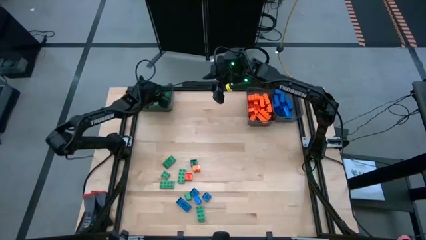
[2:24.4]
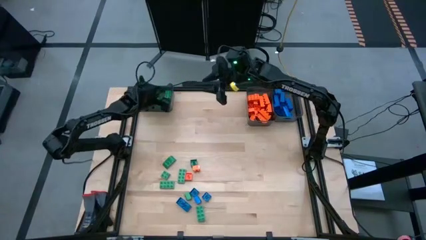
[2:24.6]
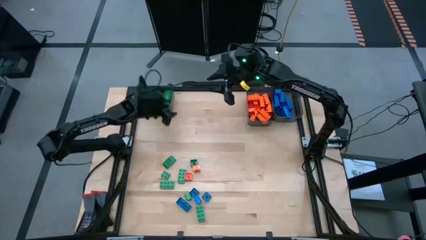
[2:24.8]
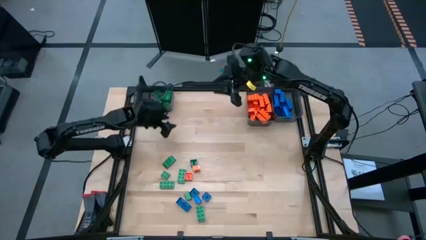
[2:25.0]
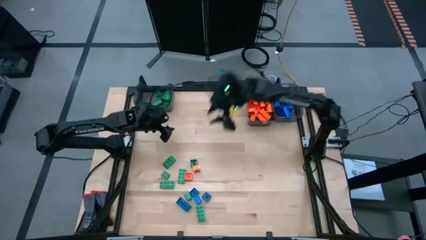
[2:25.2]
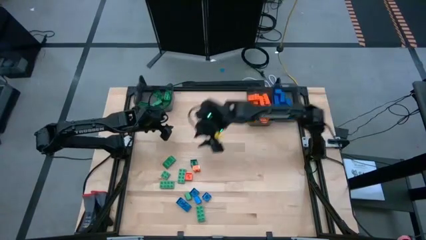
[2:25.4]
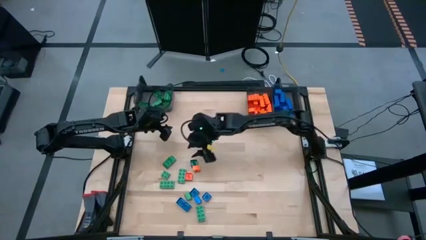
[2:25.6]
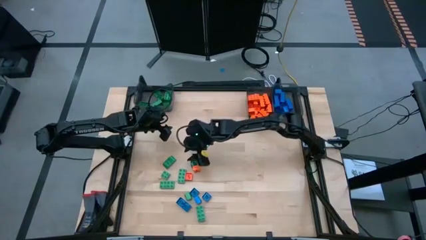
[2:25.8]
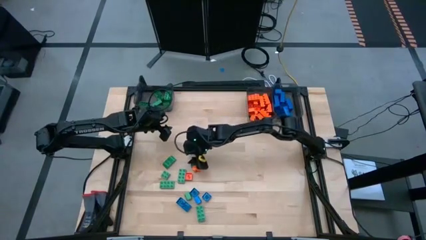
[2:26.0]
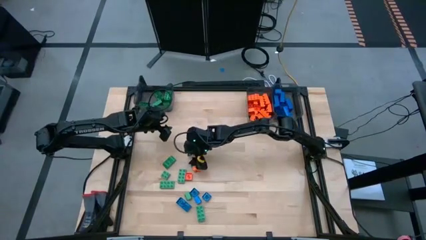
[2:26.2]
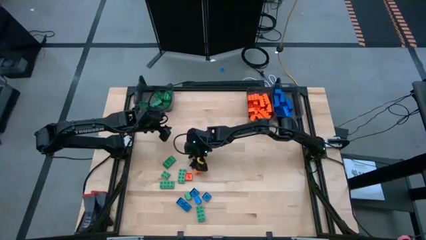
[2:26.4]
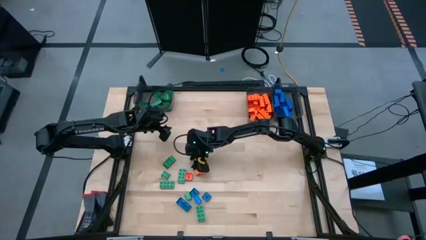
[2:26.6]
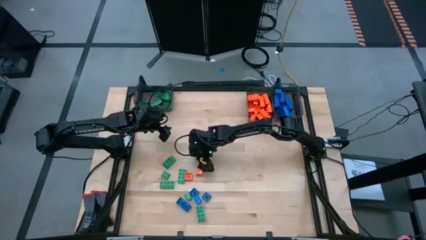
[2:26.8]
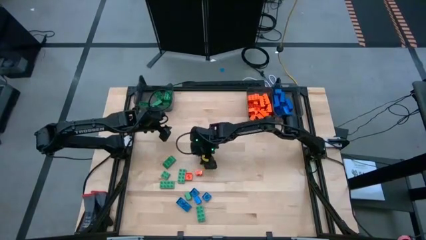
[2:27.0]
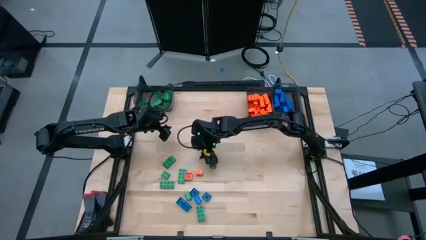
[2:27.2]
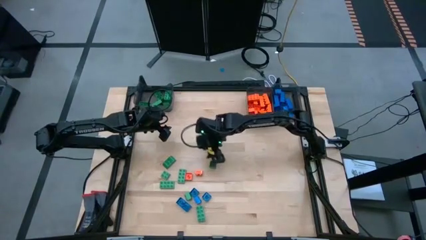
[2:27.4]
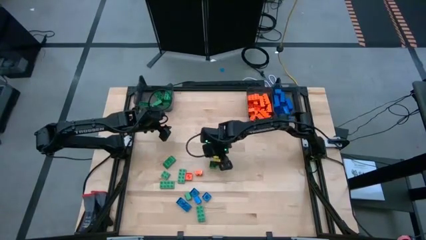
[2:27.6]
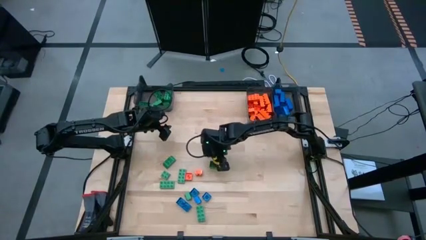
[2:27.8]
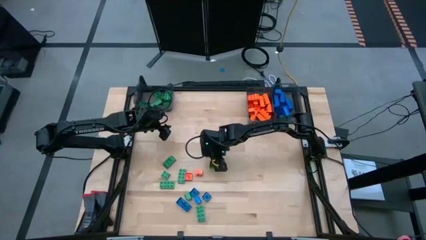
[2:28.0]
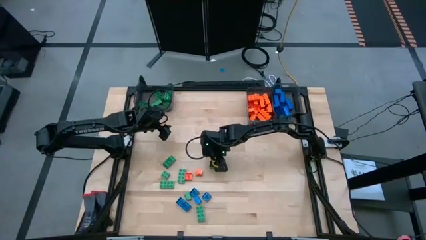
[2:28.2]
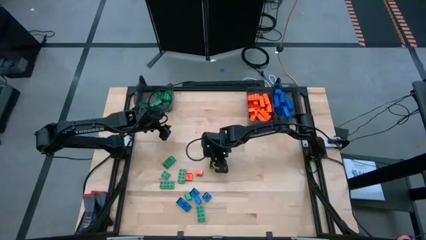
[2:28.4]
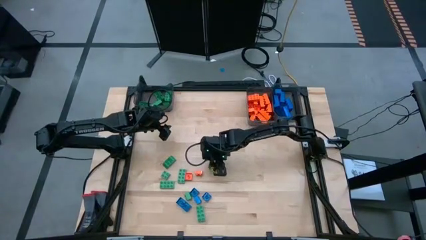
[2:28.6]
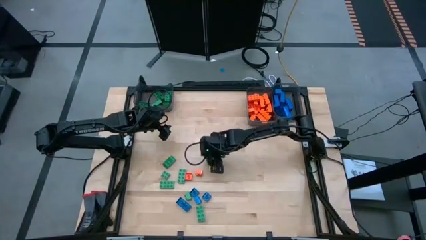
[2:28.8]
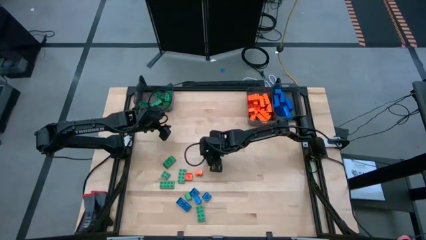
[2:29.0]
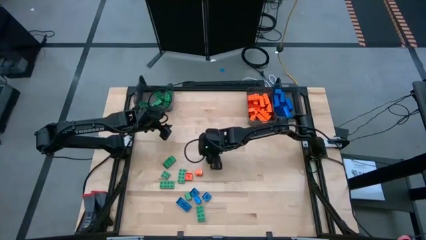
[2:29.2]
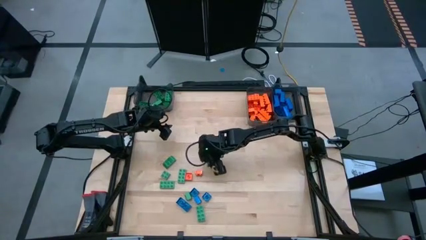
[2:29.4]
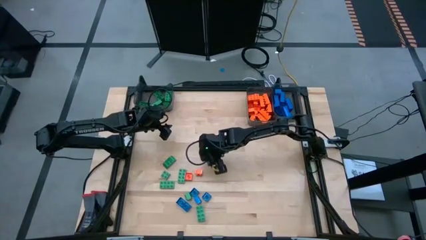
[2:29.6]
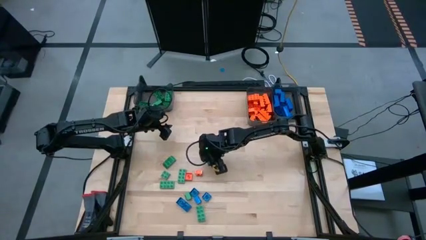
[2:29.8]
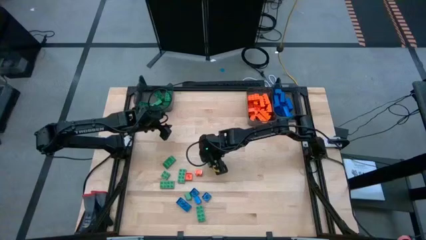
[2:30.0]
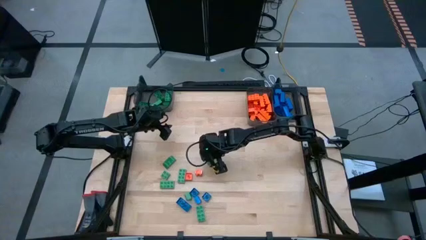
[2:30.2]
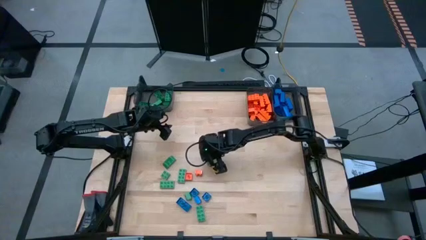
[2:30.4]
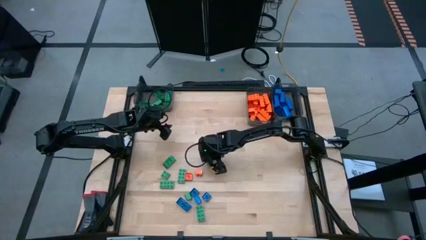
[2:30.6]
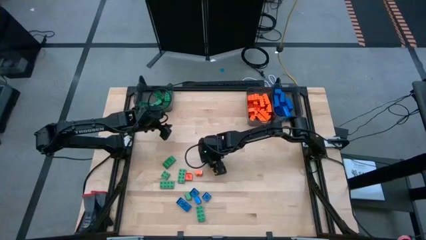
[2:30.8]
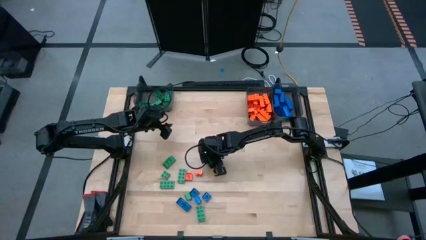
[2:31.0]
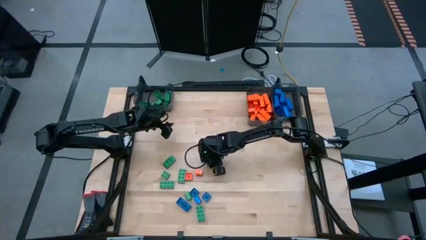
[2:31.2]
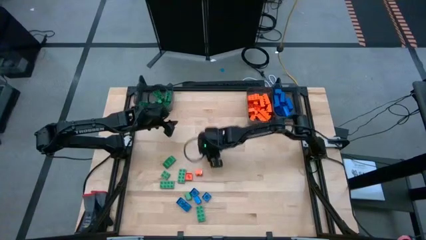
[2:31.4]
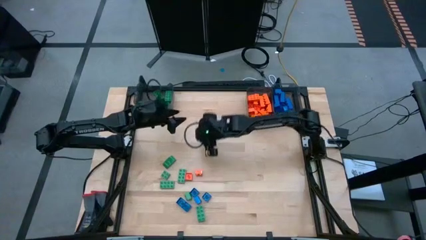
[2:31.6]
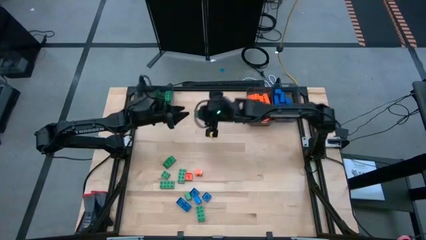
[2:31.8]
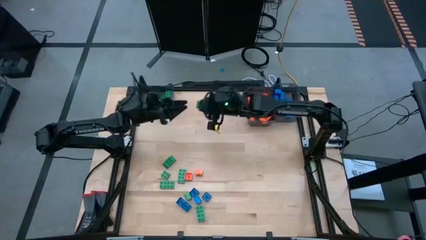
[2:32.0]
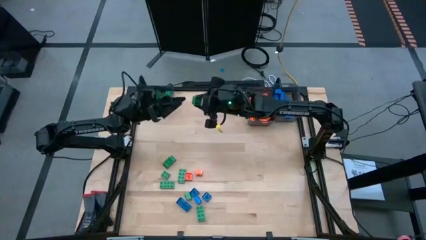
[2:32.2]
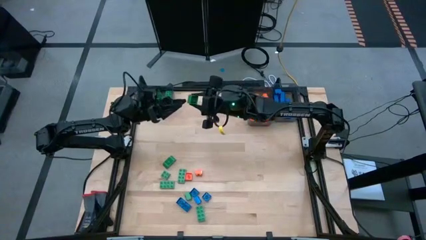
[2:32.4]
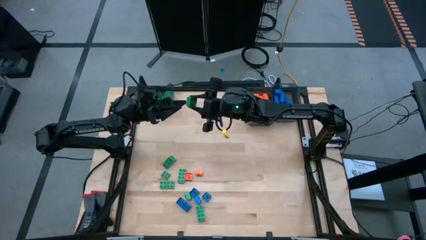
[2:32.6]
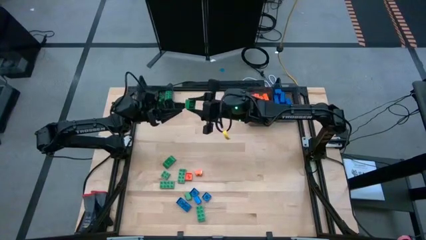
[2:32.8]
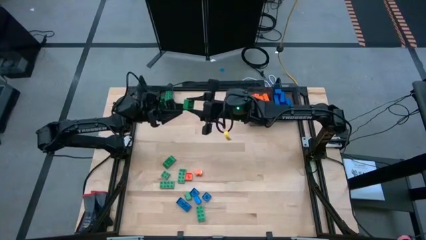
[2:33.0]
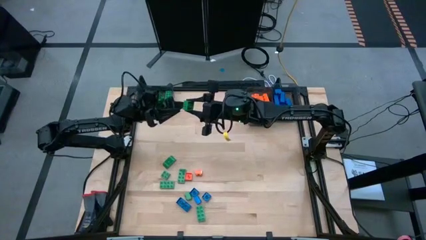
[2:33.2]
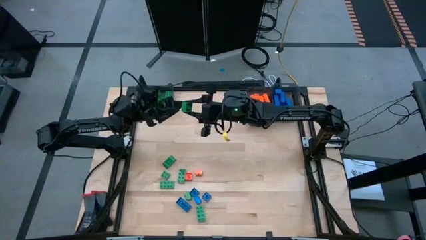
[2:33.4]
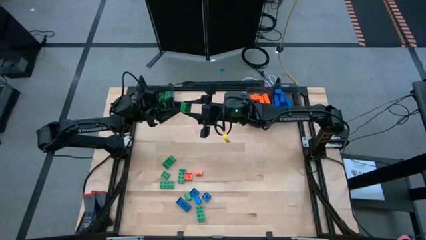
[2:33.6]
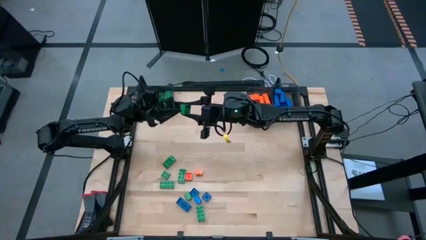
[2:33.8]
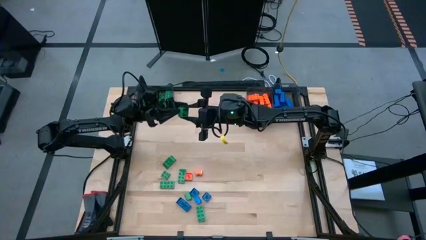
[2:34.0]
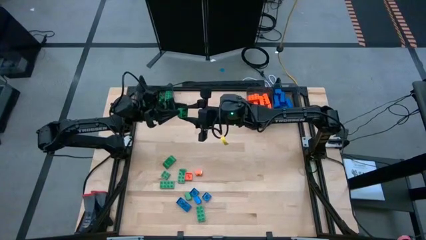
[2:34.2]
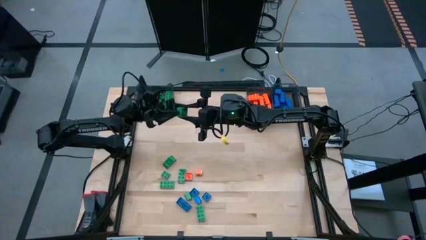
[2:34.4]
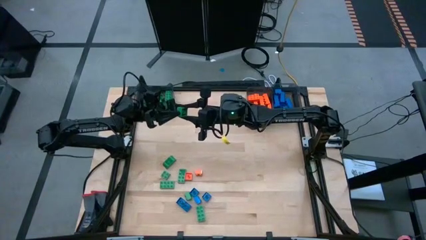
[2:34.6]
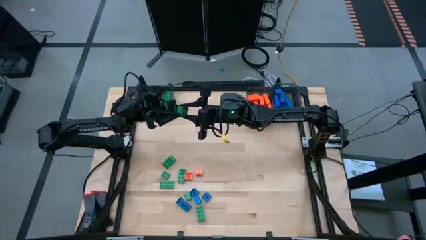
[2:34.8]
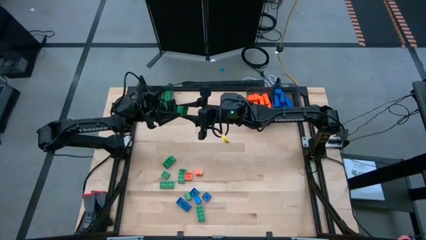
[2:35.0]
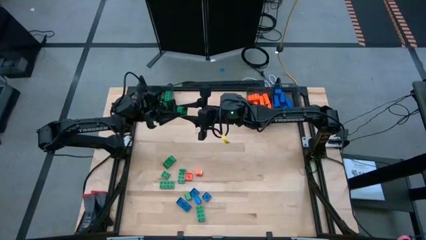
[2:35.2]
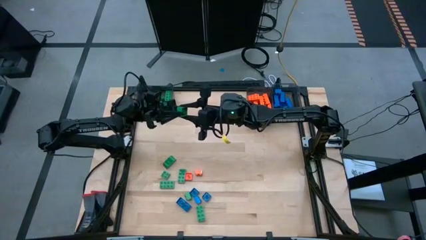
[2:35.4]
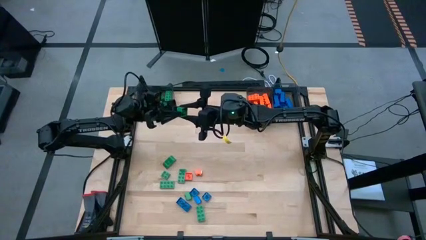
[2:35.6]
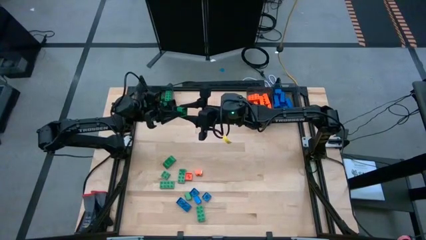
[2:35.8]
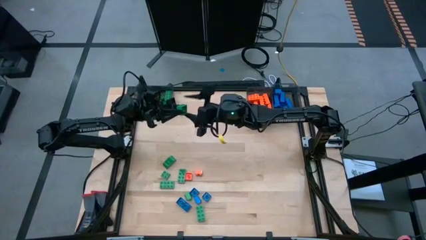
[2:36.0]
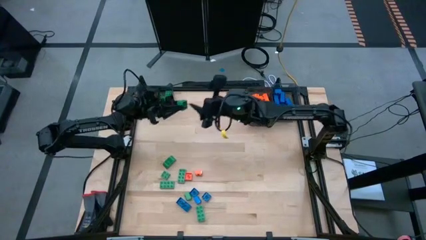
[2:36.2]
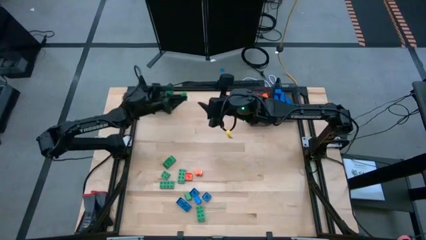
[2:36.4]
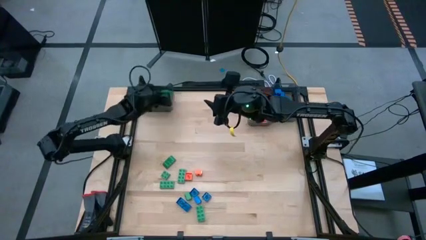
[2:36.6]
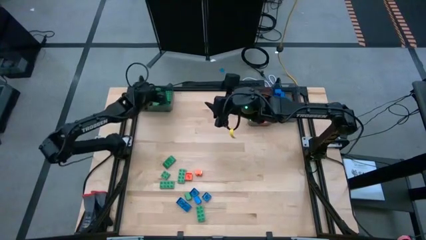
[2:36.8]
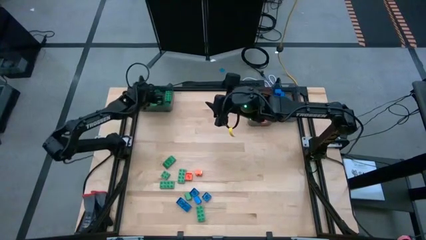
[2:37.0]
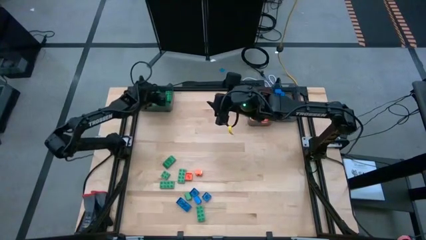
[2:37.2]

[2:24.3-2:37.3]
Task: Sort blocks
Put the green game piece into the left black bin

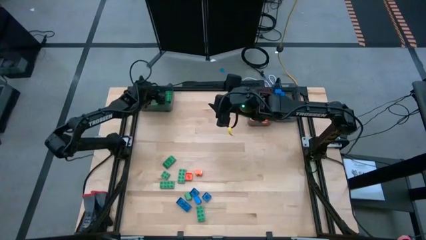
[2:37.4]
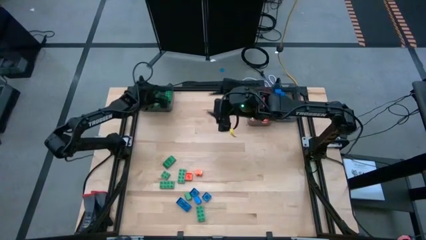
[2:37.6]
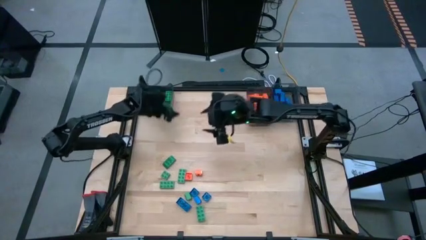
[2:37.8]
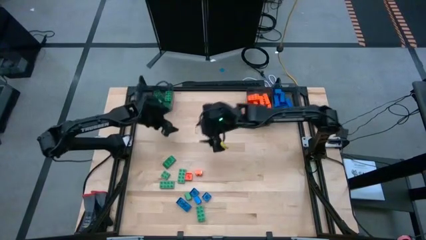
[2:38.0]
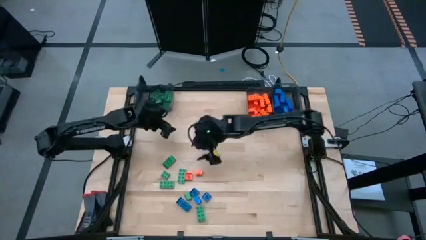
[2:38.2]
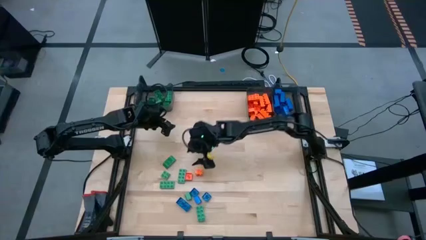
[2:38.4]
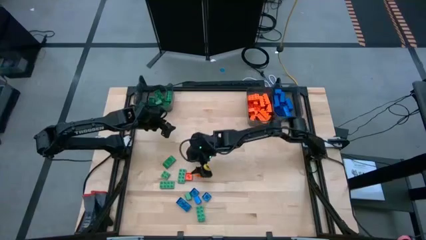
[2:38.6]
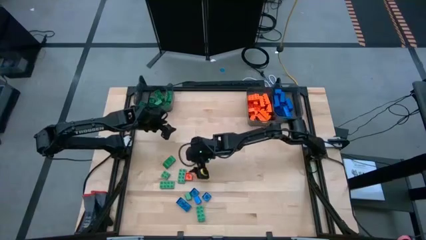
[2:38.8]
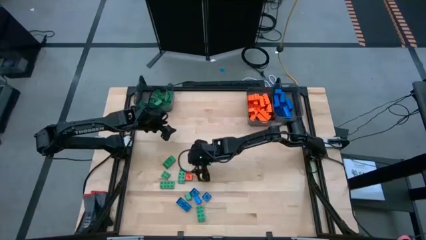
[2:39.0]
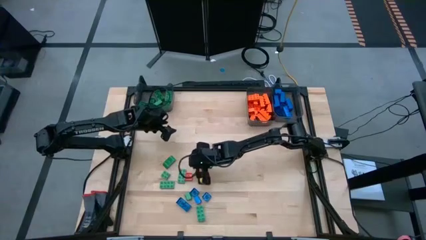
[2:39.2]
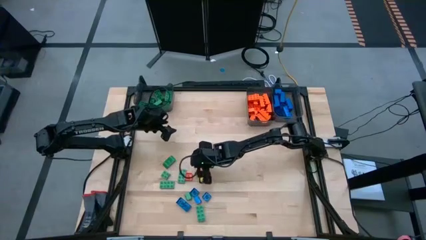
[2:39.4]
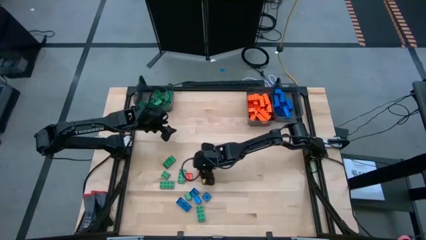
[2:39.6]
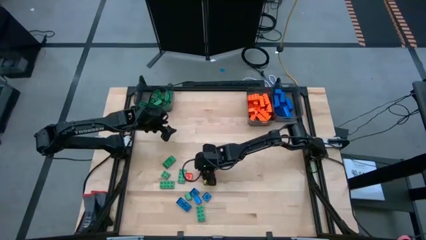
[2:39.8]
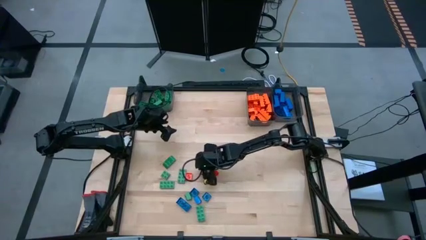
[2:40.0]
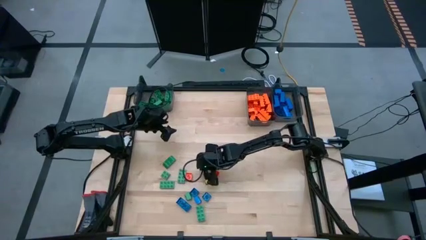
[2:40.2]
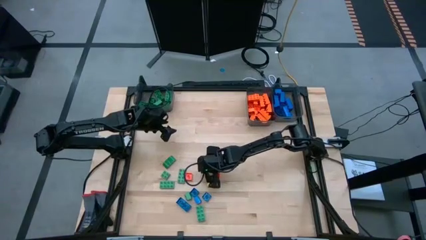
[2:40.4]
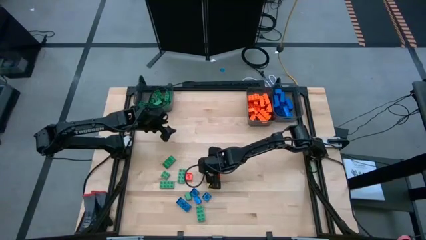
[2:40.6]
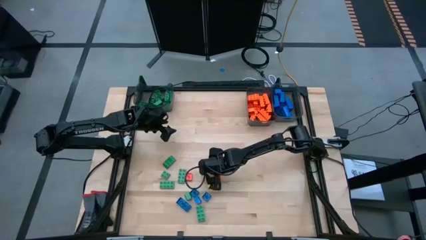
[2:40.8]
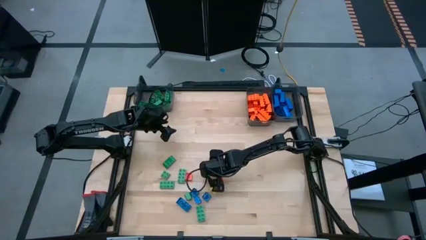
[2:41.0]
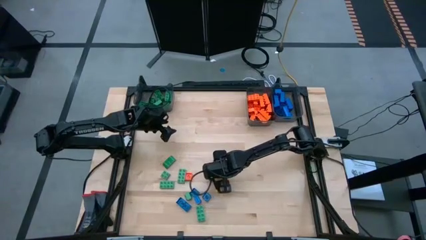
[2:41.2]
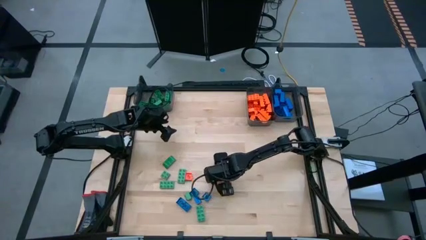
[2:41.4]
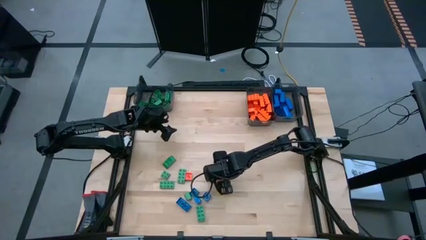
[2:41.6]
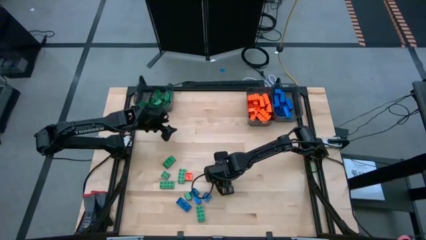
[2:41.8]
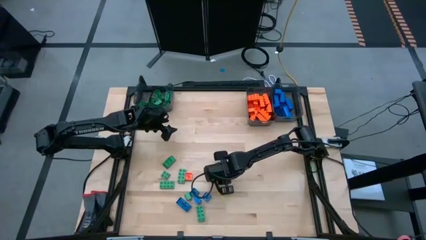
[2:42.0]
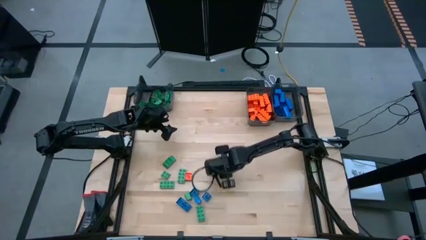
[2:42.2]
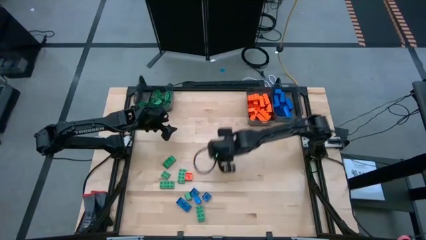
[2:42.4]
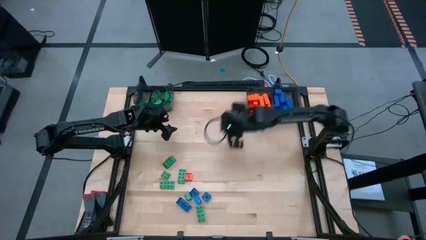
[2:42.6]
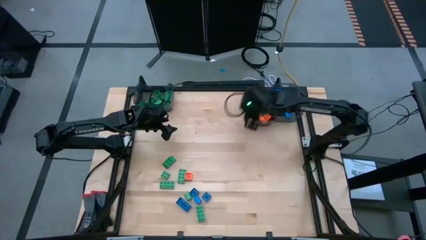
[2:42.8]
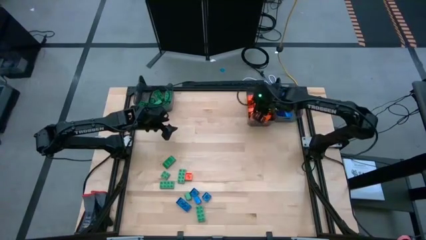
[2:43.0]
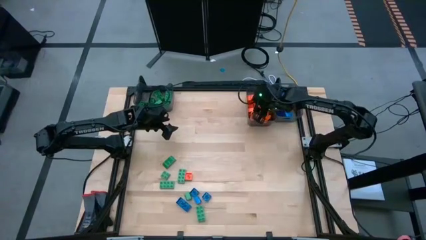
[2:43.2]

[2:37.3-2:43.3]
Put the orange game piece into the middle black bin
